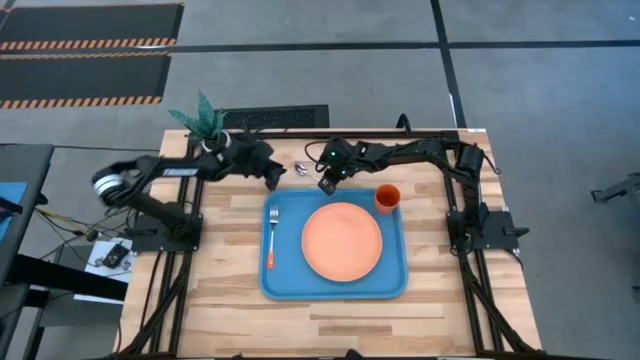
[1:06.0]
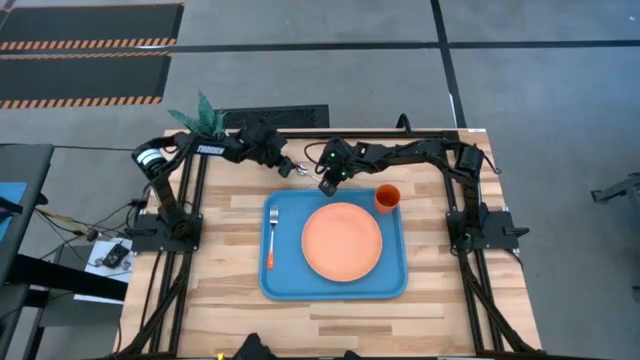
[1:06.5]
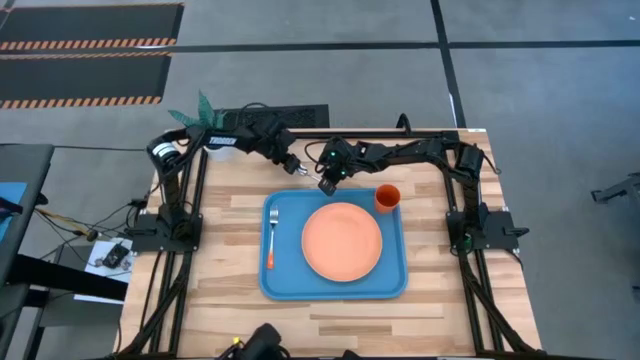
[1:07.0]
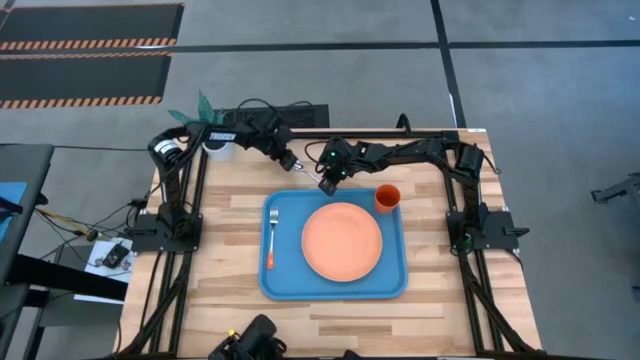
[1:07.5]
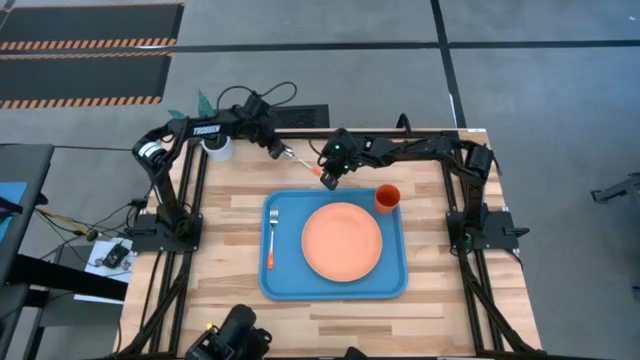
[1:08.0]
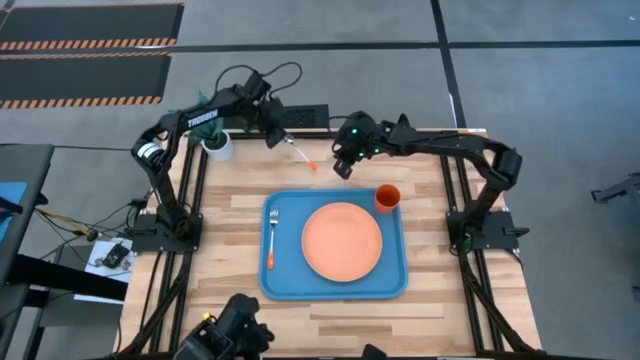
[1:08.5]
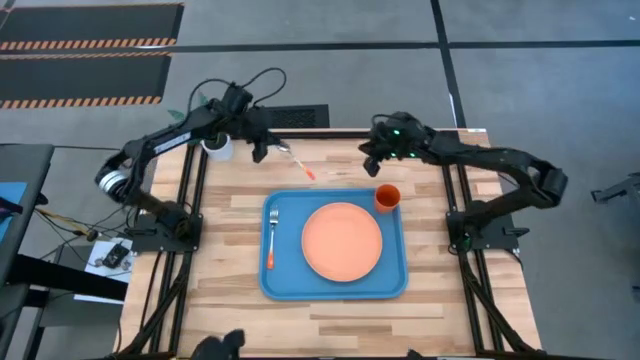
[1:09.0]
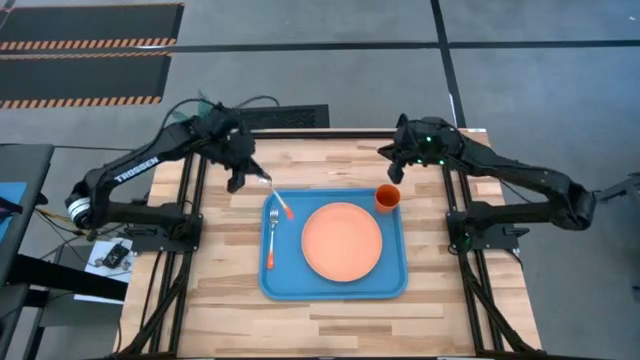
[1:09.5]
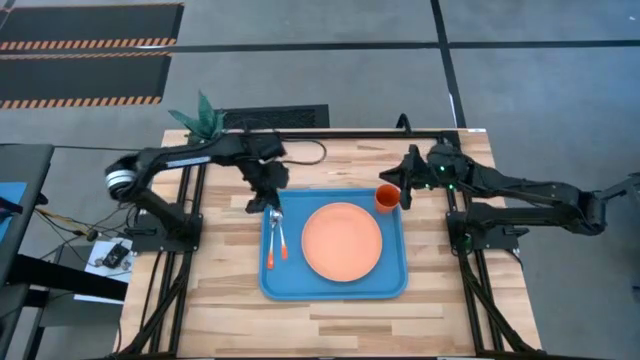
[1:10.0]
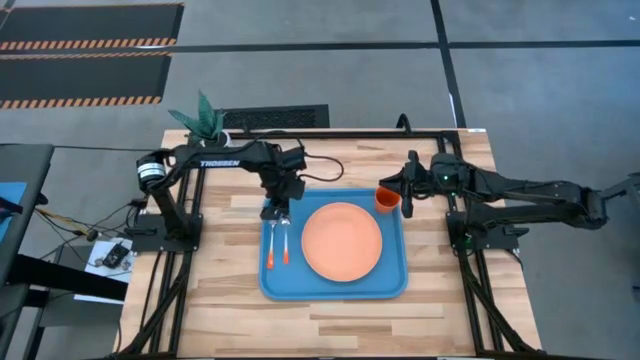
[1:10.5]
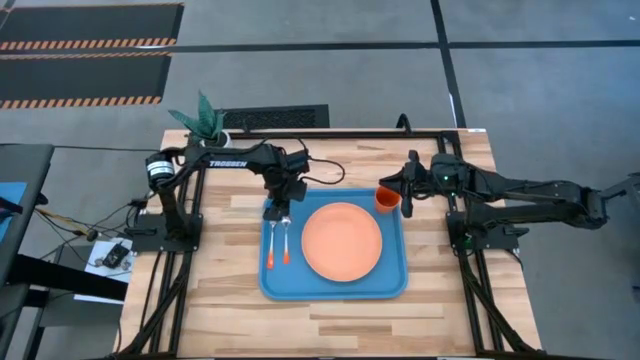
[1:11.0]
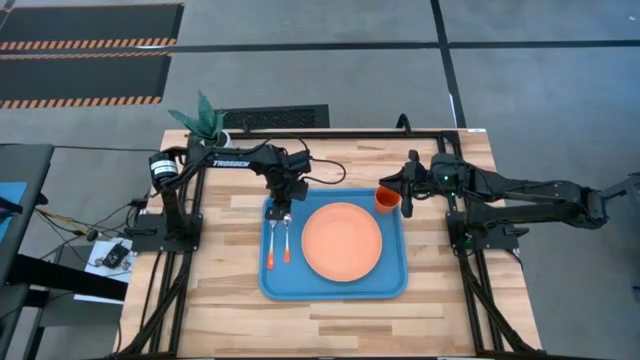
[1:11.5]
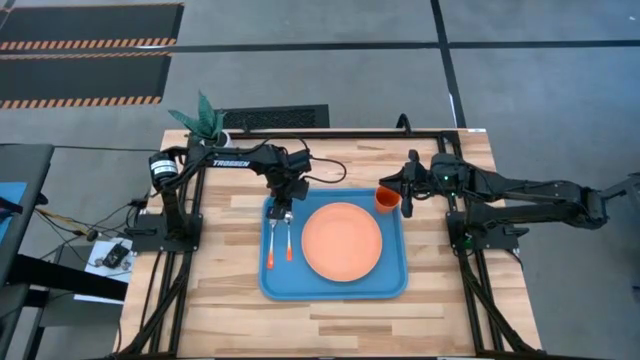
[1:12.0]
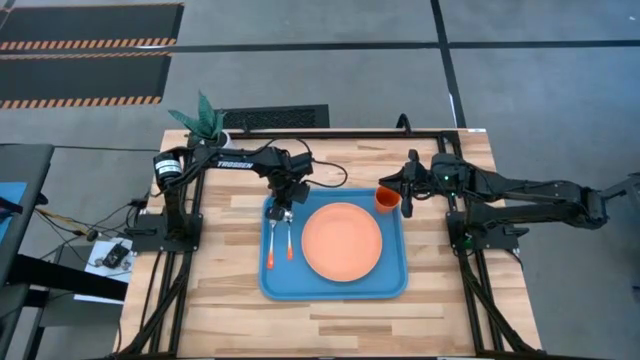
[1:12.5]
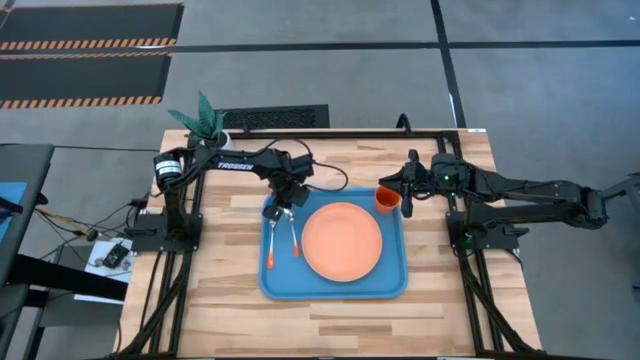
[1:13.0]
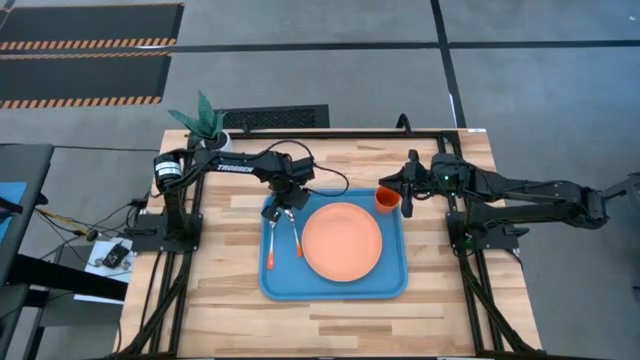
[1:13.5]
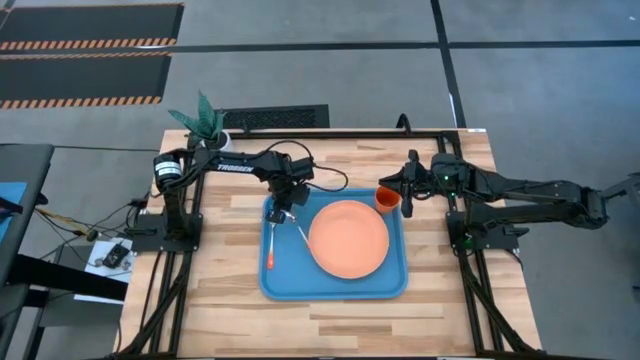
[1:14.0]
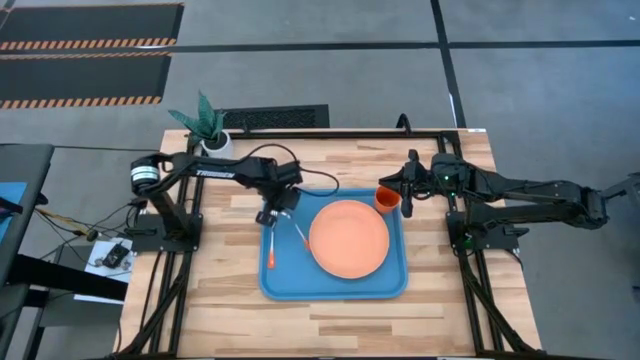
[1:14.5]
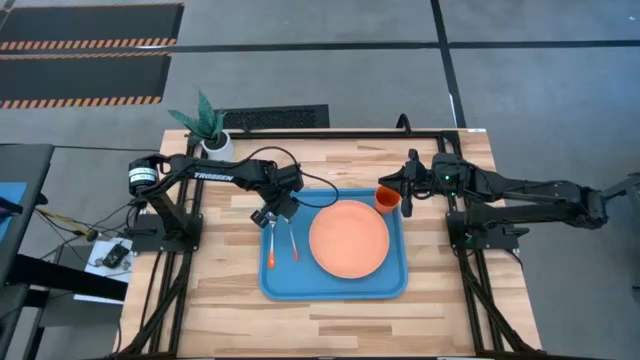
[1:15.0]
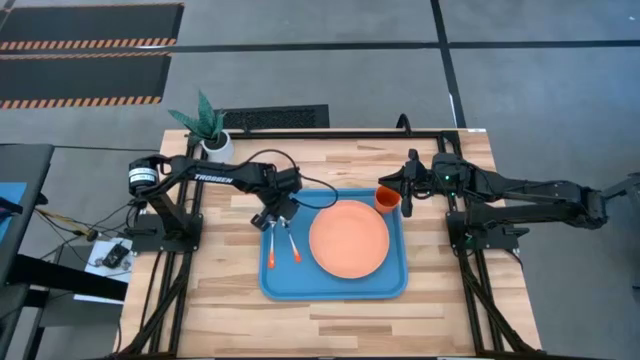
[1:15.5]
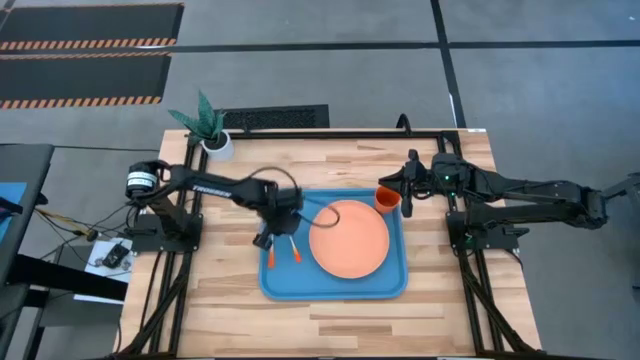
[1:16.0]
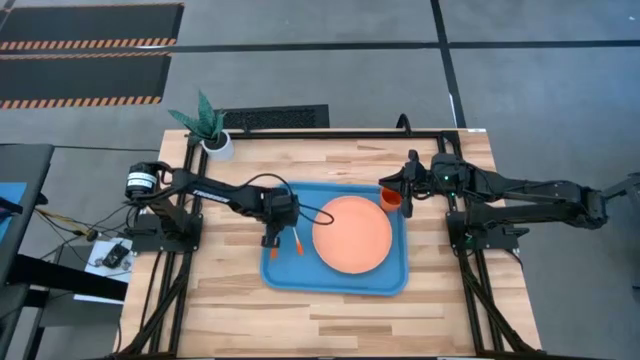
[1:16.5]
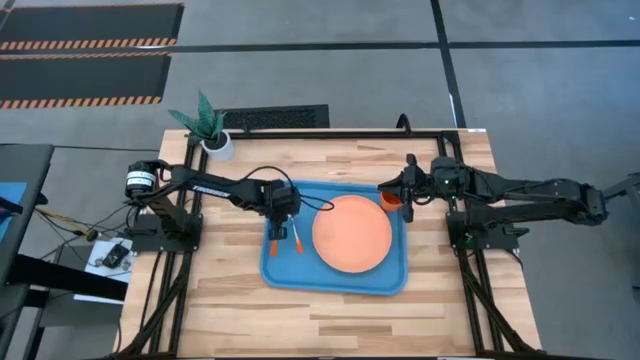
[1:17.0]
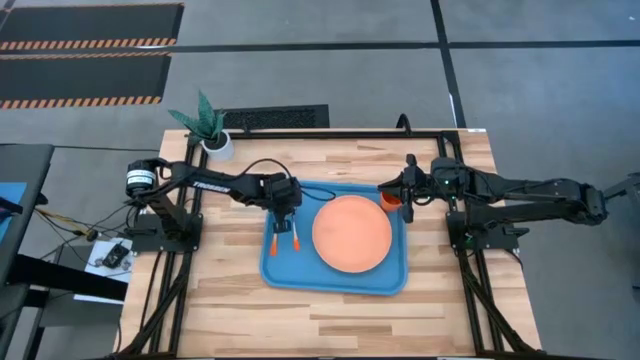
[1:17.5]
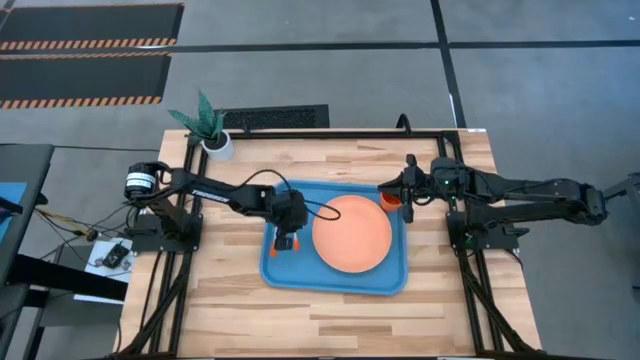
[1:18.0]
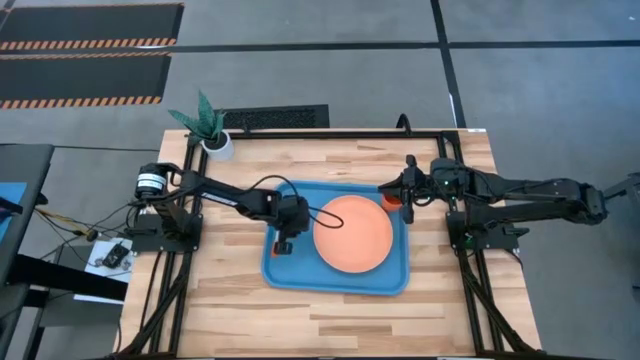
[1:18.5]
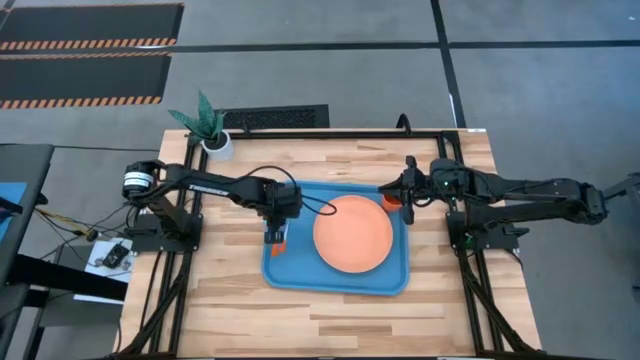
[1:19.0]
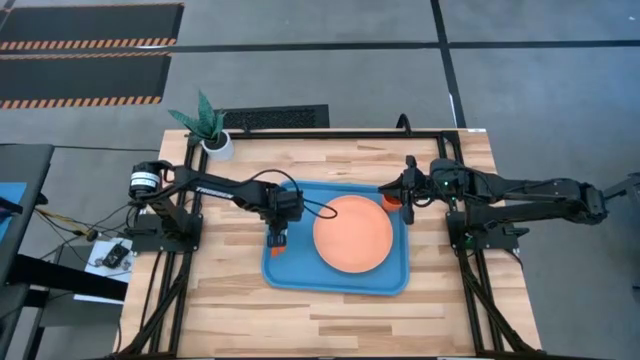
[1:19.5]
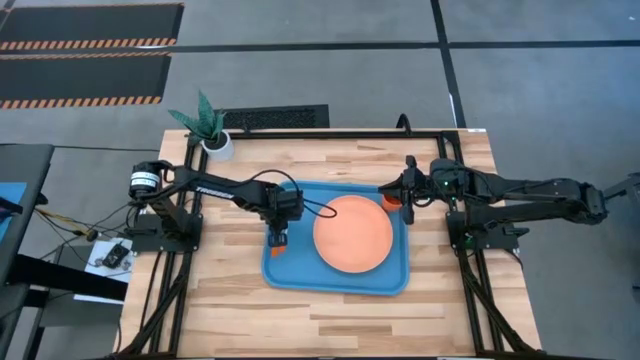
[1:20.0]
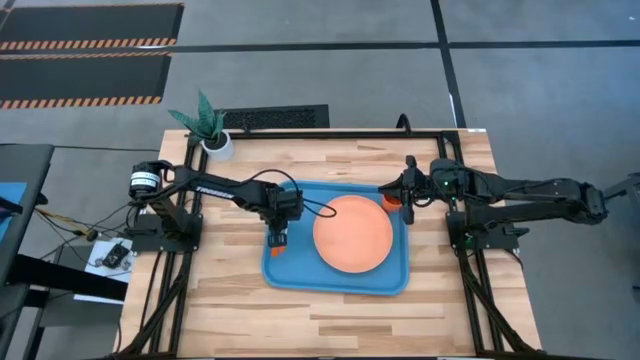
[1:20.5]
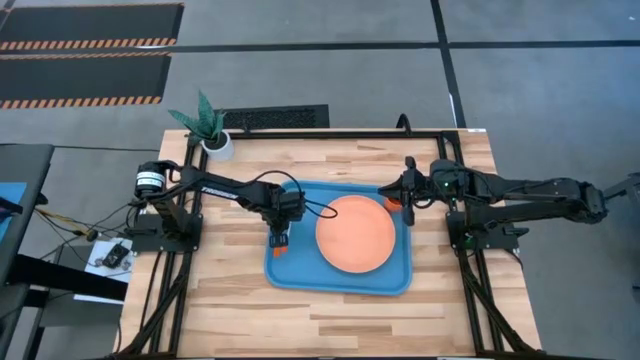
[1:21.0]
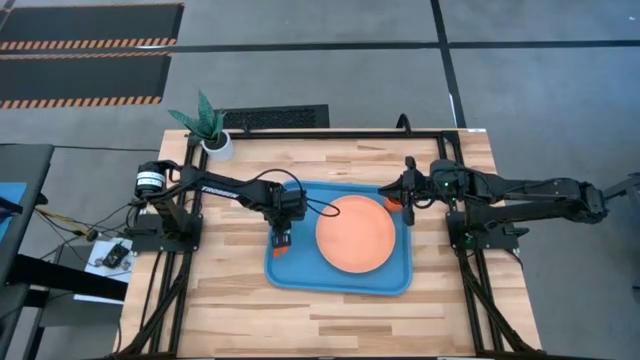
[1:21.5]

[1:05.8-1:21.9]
Task: Pick and place plate/cup/fork/spoon on tray
Put the orange spoon on the right of the orange plate on the blue tray

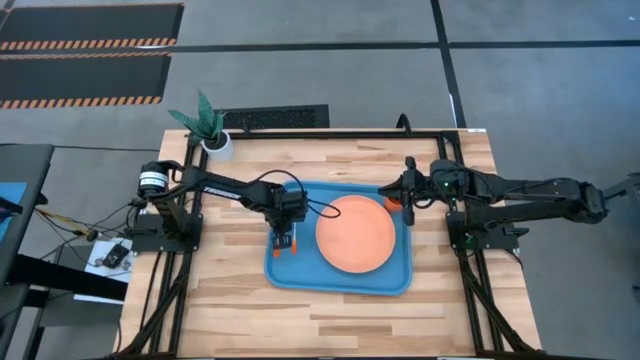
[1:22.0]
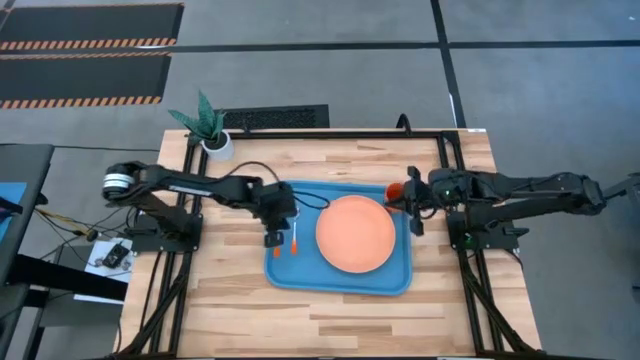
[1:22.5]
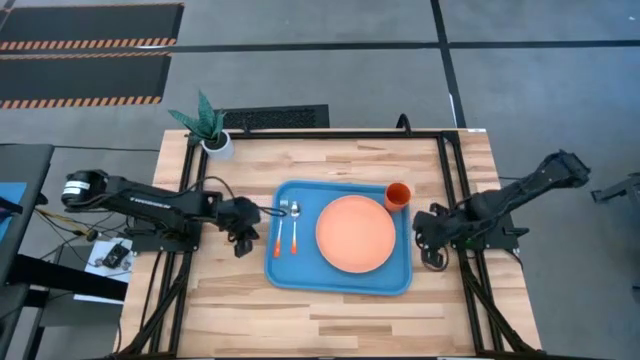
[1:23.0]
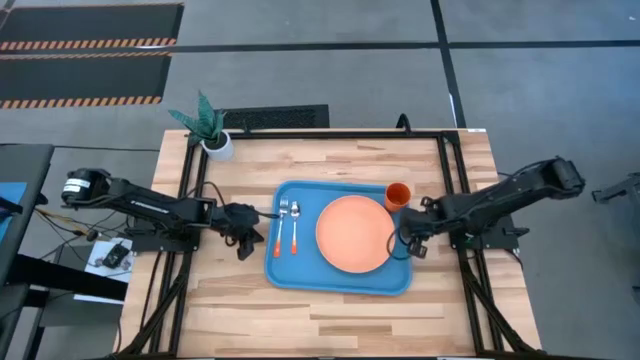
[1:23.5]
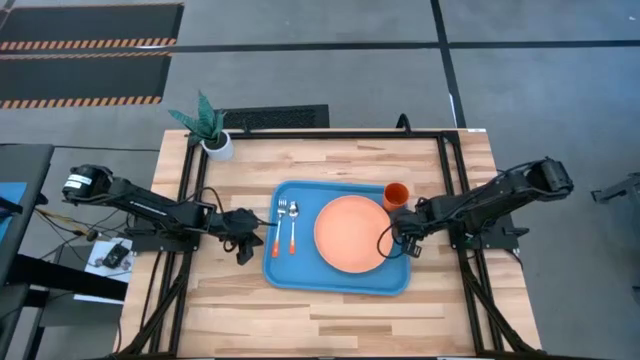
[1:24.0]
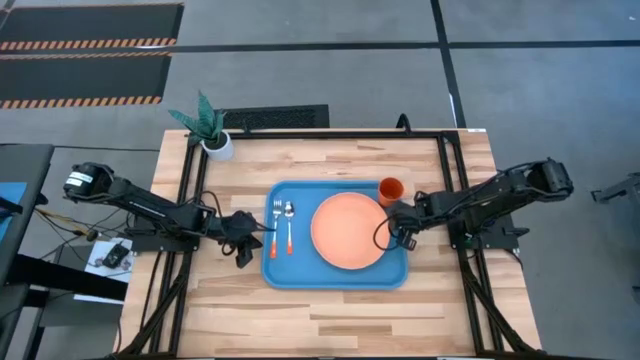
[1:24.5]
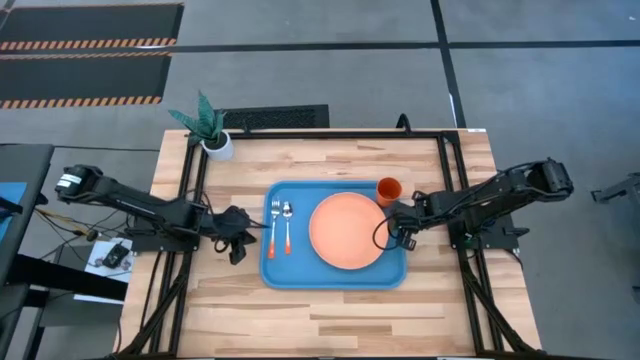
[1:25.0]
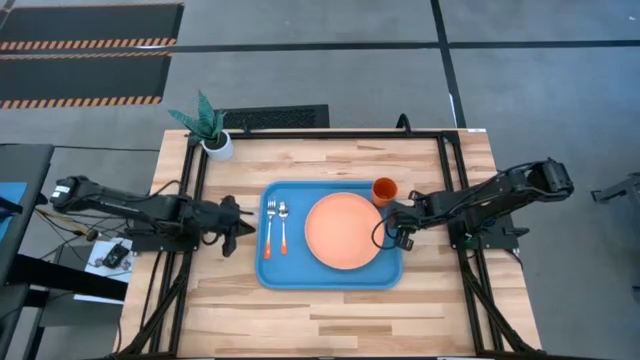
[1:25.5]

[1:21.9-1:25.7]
Adjust the blue serving tray

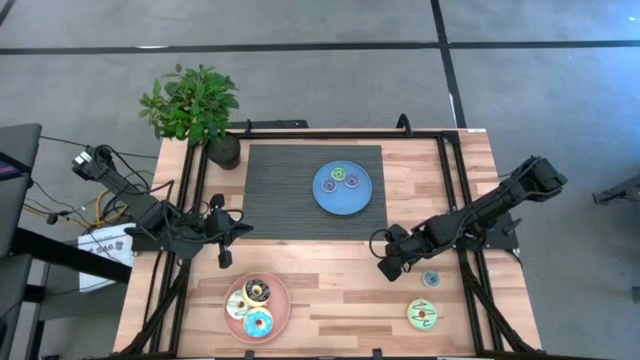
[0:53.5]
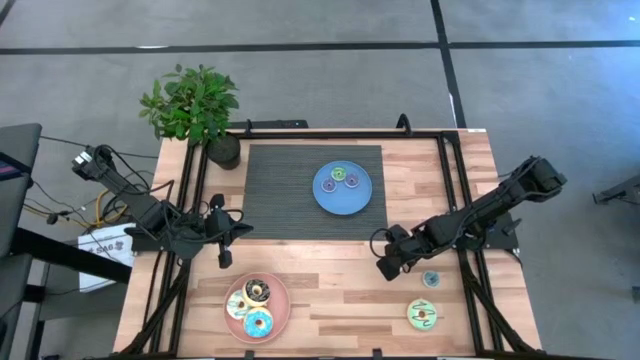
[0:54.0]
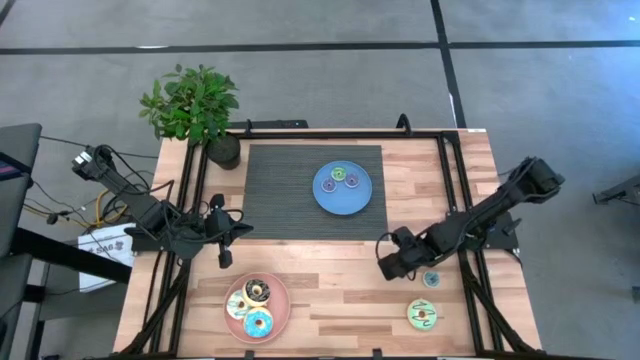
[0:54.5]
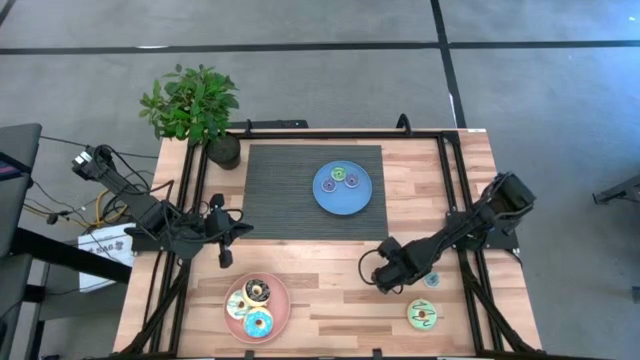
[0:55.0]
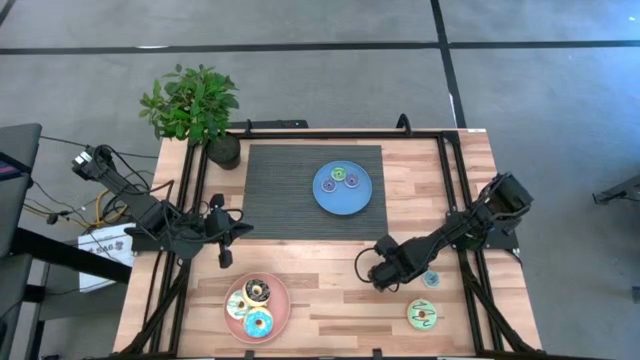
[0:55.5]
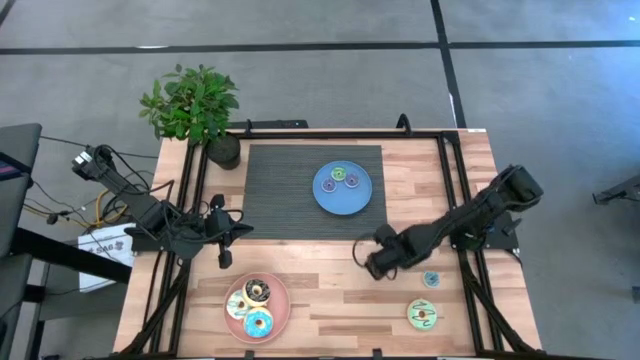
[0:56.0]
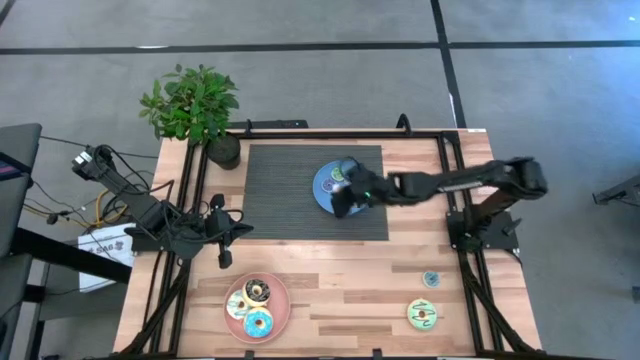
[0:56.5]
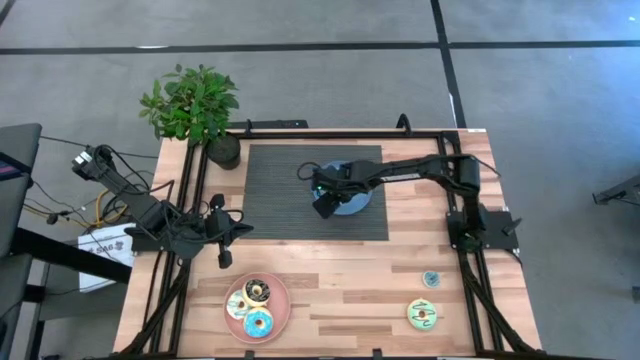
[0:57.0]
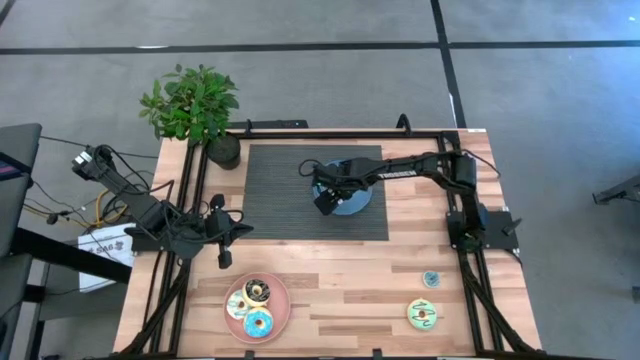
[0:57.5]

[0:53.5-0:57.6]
Task: Pick & Place donuts
Put the small white donut on the blue plate
